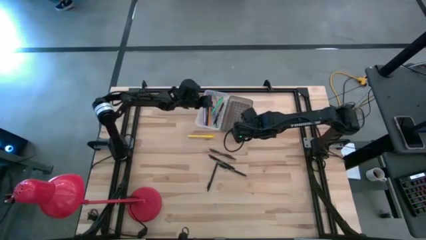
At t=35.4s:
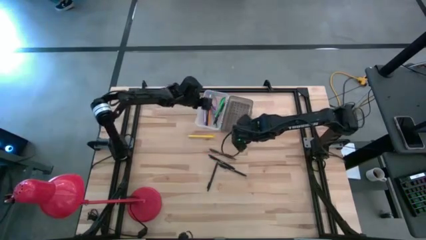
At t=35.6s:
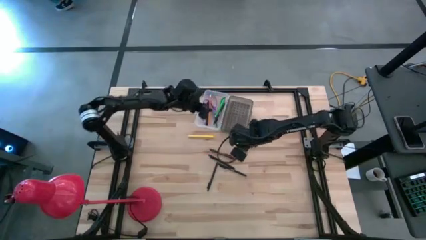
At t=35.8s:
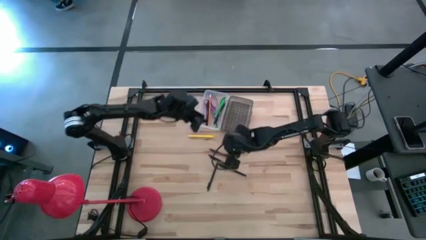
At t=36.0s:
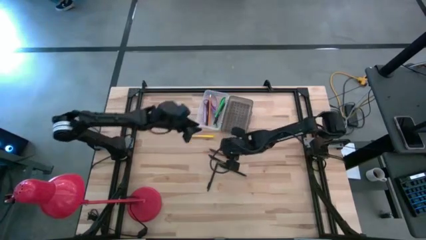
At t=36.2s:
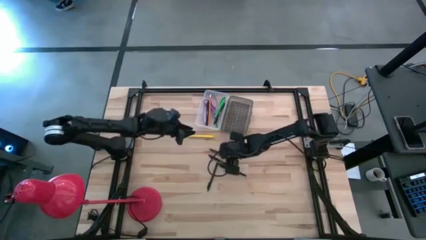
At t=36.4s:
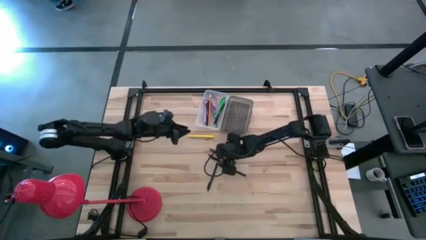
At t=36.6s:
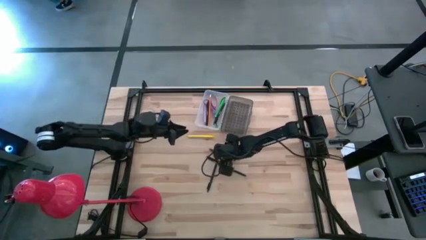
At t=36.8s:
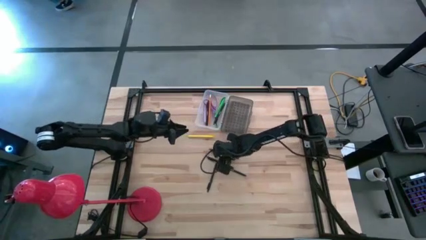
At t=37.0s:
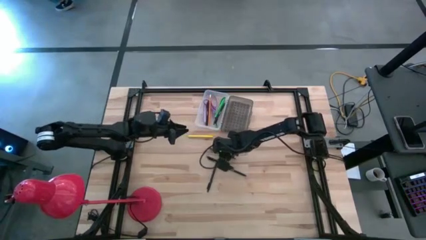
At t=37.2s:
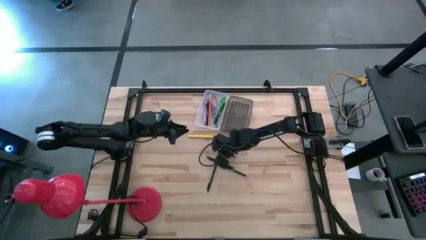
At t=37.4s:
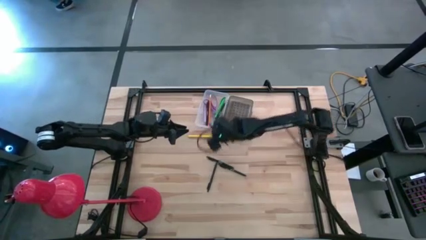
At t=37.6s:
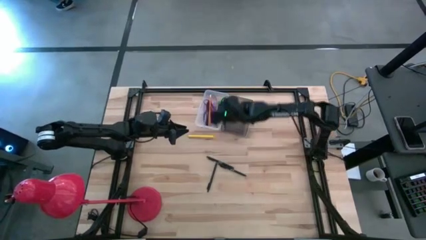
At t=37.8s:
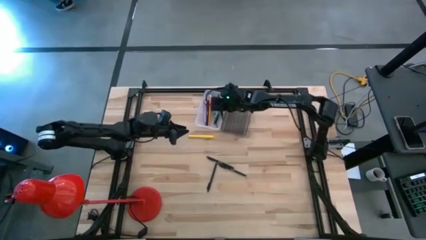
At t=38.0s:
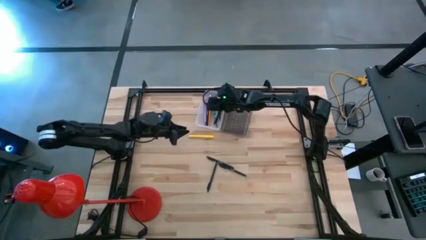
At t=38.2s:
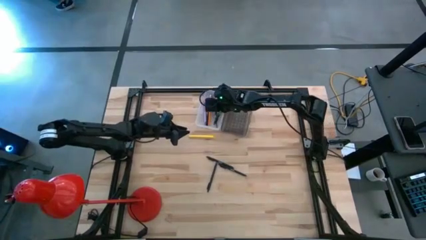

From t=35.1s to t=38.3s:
Task: Pick & place school supplies into a supply box
Put the brown pen into the transparent supply box

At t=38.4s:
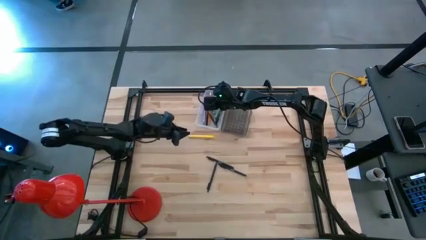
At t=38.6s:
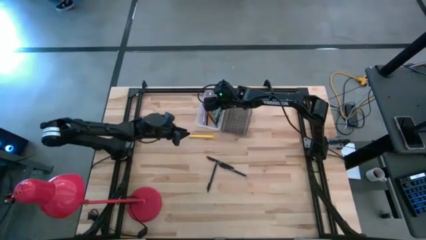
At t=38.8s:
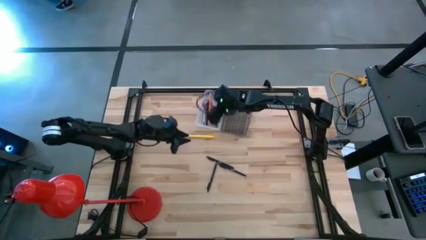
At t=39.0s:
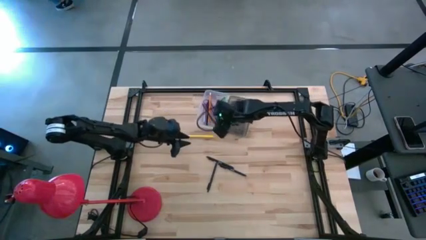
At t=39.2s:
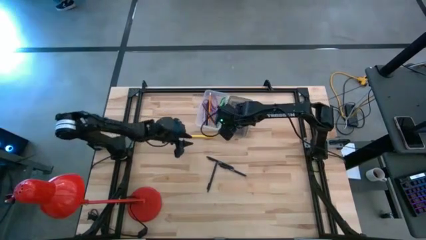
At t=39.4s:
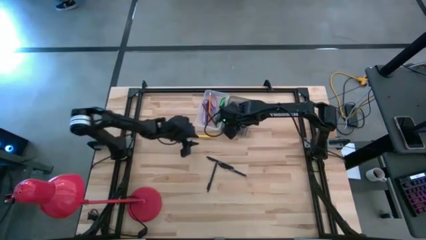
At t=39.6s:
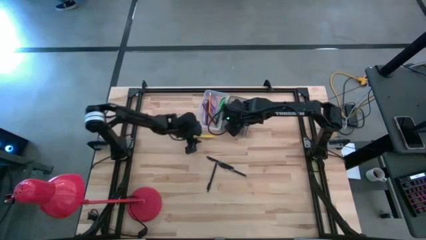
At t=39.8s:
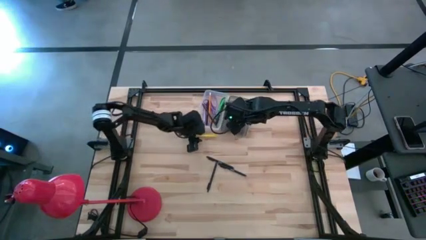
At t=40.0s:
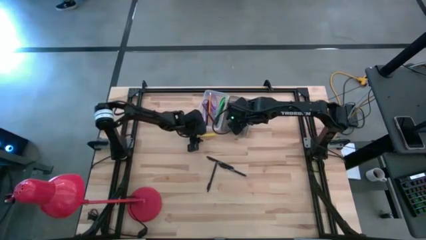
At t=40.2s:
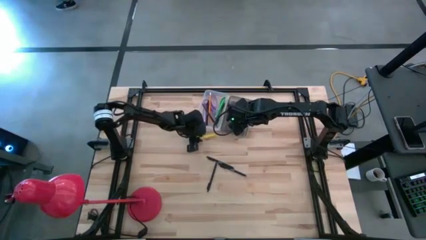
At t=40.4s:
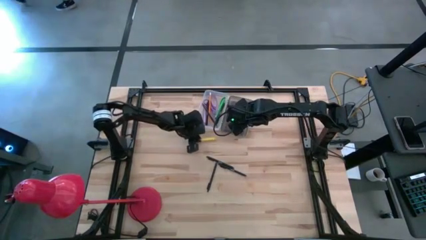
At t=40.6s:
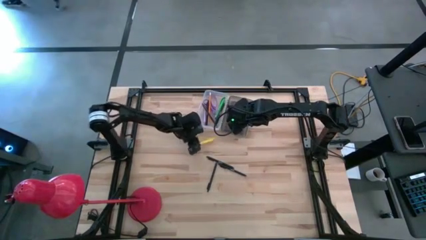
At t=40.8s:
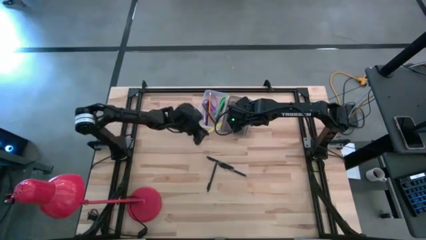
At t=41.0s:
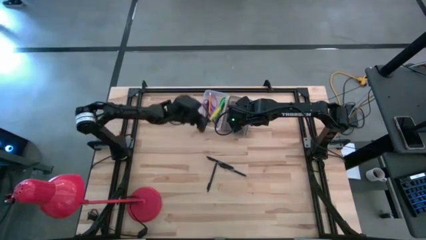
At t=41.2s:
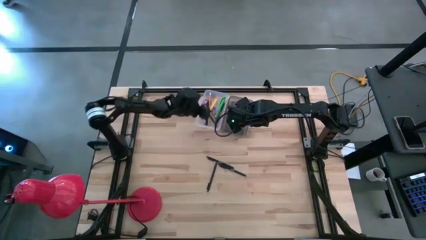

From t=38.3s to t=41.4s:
Put the yellow pen into the transparent supply box

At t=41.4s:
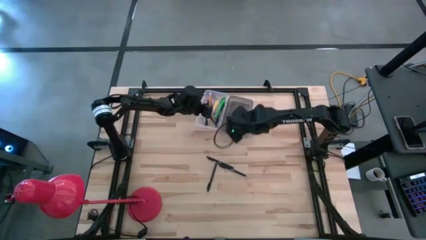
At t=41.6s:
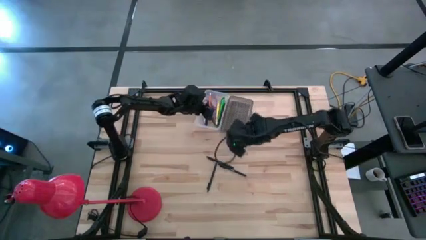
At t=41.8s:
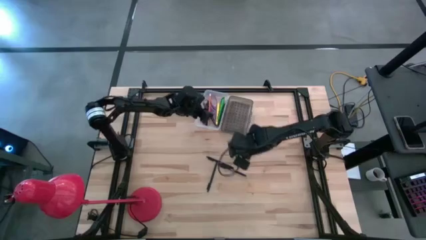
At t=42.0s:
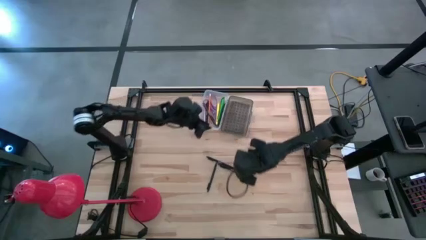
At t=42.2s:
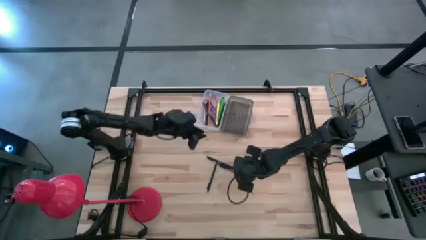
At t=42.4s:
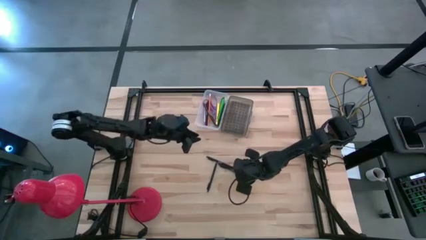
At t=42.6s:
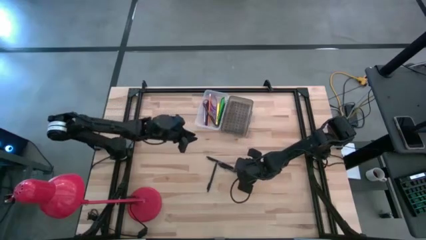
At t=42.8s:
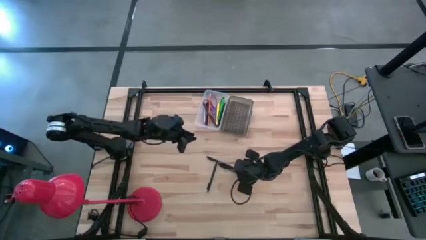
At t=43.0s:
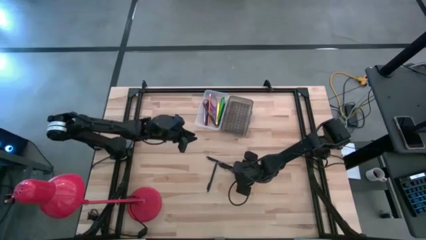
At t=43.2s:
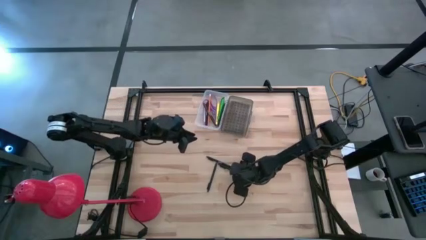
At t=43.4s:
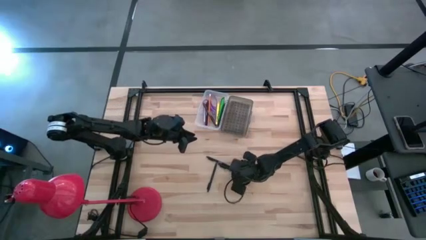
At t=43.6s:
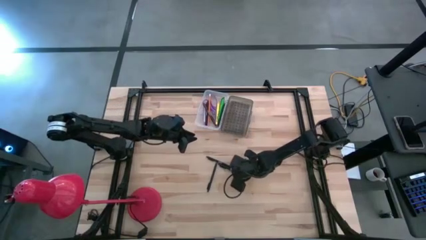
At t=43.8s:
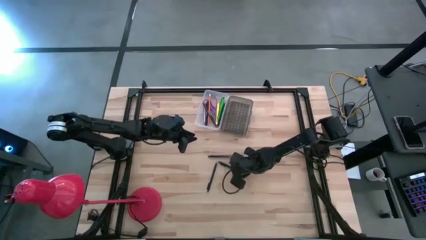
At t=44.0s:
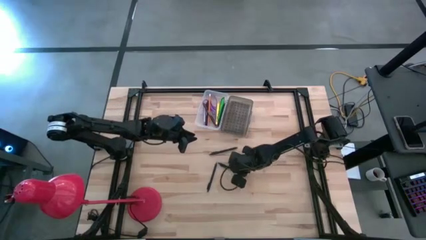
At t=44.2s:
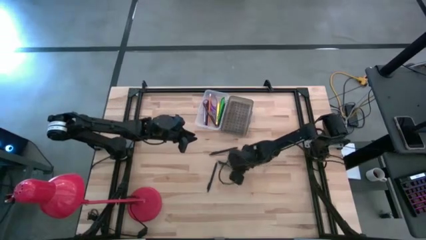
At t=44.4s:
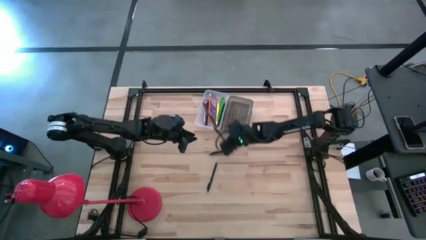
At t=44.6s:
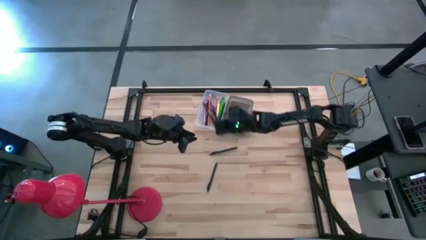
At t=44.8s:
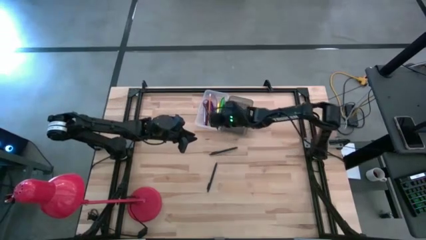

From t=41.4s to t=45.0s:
Put the black pen into the transparent supply box

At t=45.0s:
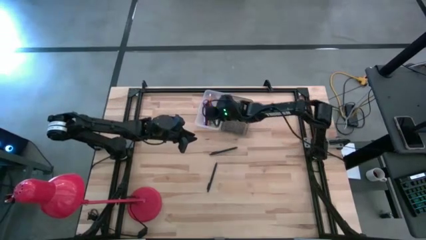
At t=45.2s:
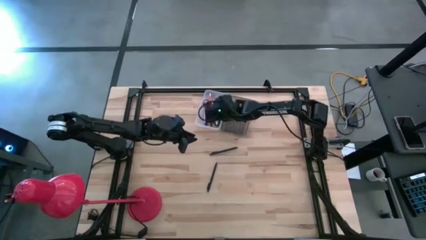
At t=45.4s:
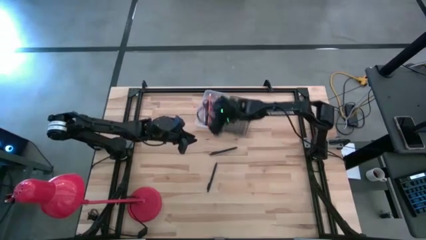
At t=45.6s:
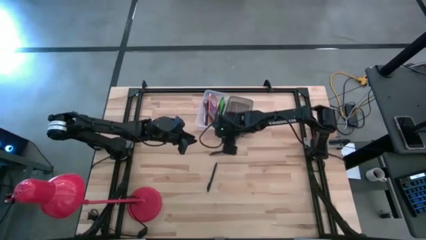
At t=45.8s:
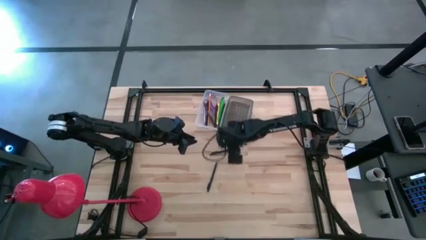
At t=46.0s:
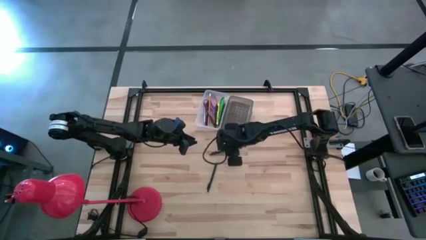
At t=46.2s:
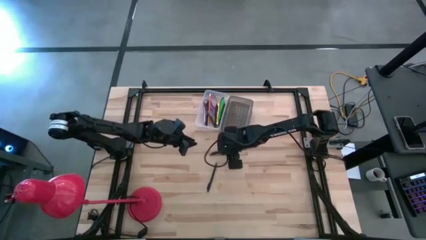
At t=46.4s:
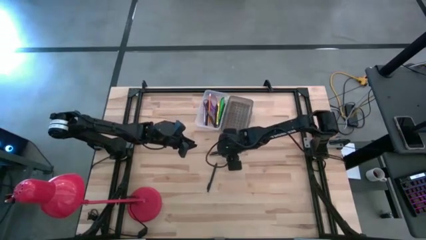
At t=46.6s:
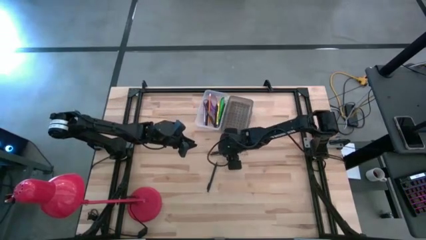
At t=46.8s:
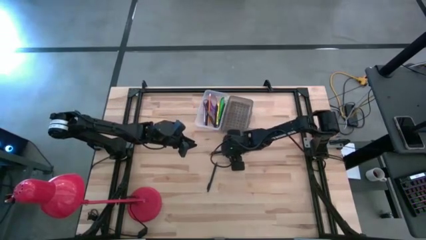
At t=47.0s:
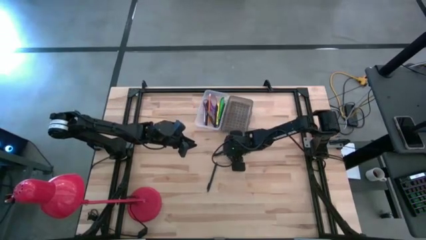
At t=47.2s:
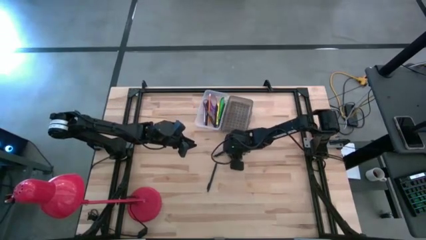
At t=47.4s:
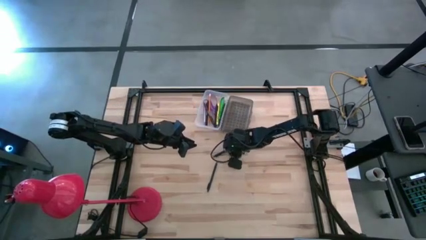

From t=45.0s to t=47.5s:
Put the black pen into the transparent supply box

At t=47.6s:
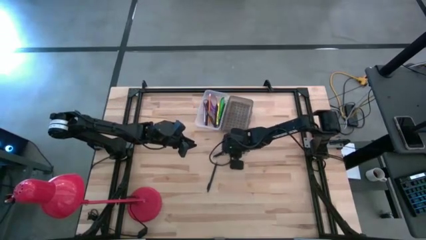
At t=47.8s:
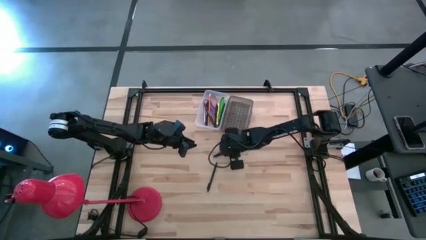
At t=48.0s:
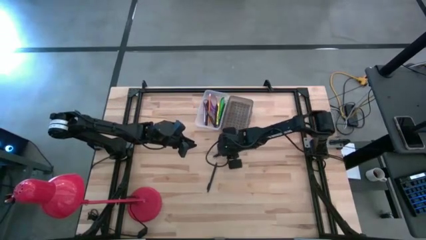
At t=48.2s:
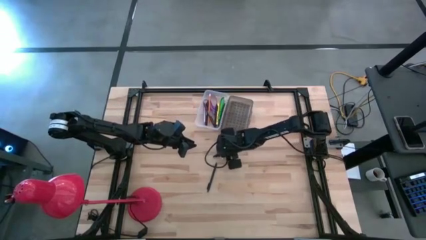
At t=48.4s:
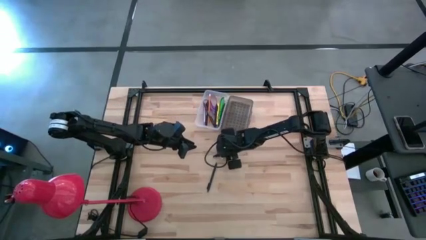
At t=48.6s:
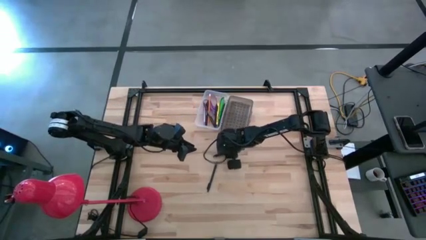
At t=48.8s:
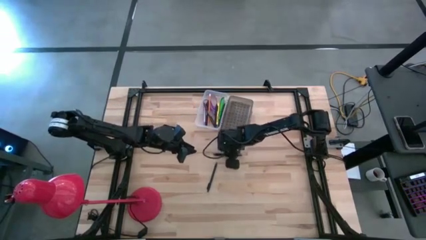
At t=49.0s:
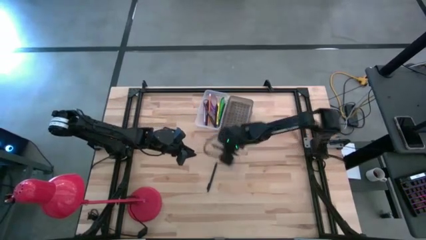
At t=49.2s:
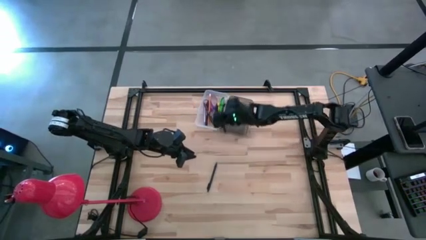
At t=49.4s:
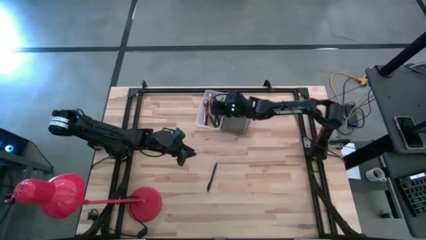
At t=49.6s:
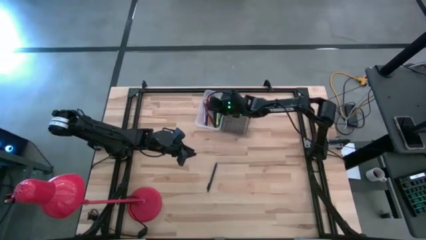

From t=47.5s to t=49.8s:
Put the black pen into the transparent supply box

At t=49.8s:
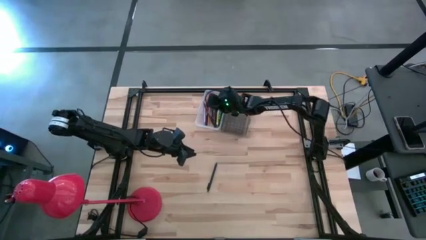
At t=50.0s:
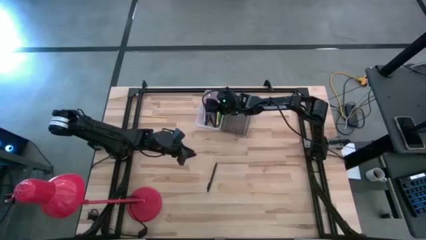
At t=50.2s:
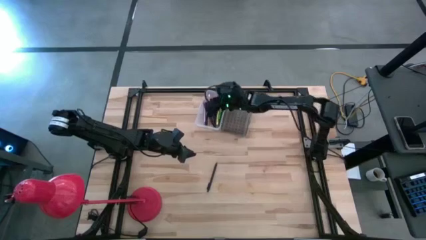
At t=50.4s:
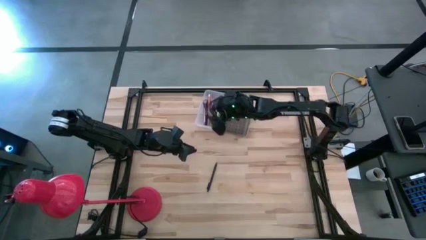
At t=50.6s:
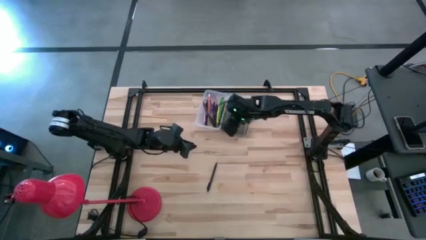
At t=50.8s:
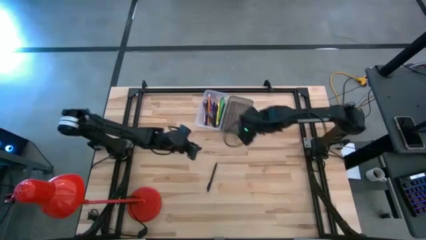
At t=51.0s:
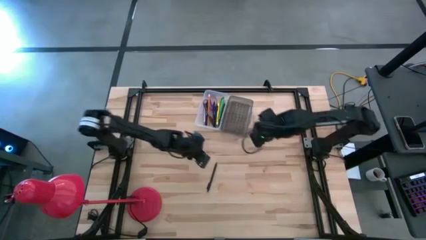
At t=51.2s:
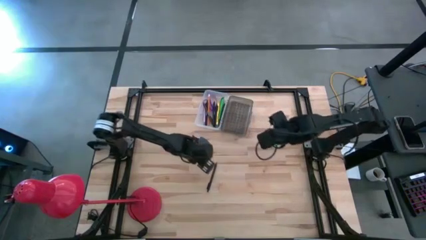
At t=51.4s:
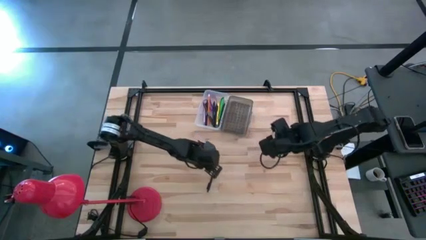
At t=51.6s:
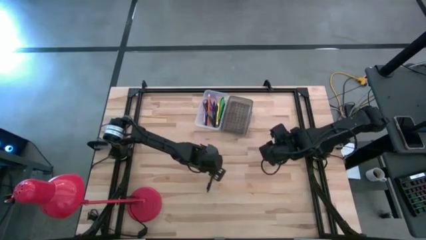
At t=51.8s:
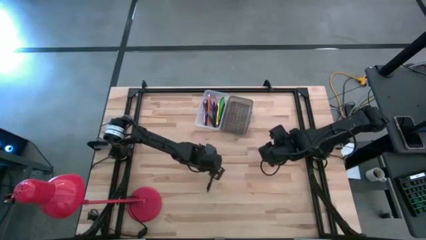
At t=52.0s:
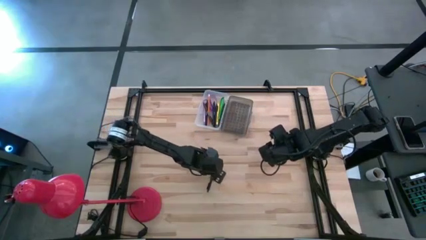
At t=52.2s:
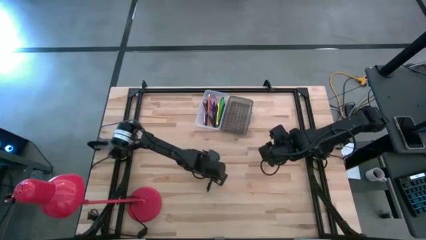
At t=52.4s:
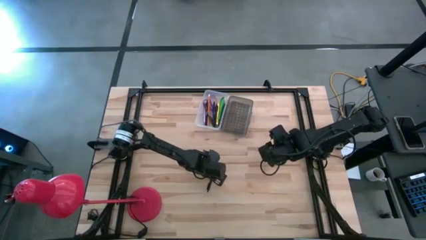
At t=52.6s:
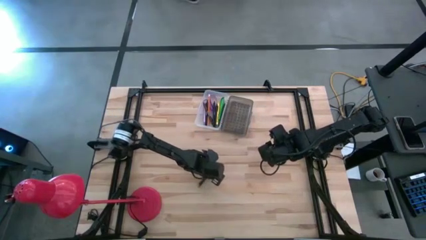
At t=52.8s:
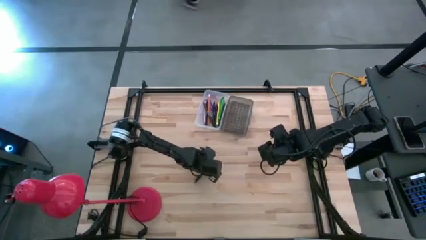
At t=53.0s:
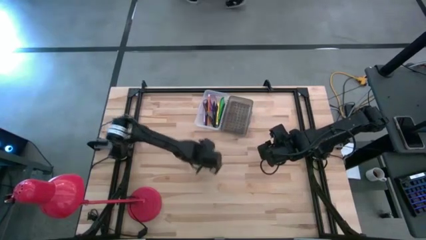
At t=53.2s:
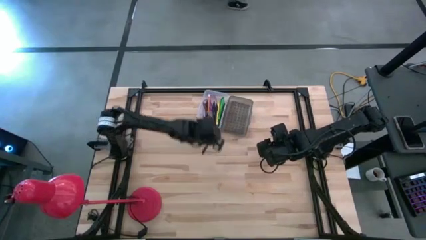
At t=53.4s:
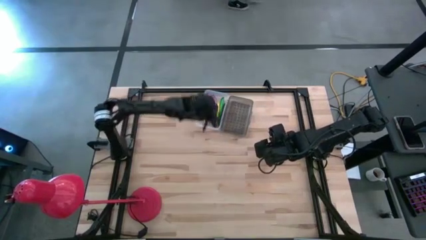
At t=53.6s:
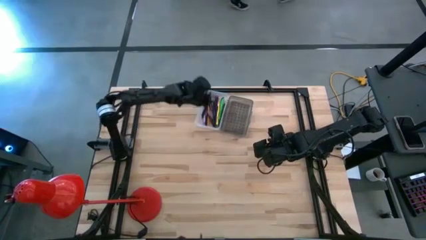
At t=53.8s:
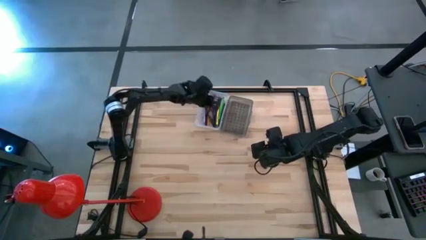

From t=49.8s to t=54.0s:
Put the black pen into the transparent supply box
